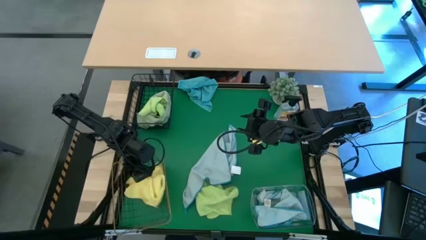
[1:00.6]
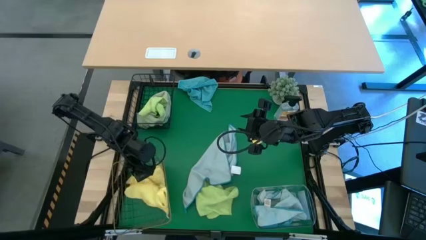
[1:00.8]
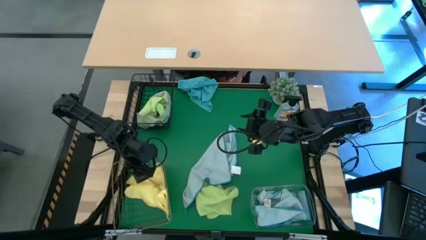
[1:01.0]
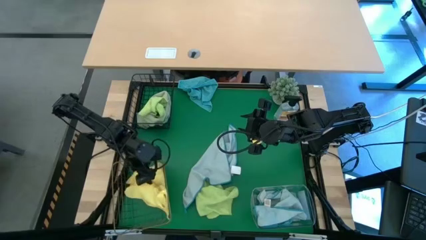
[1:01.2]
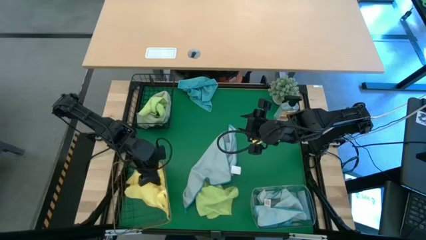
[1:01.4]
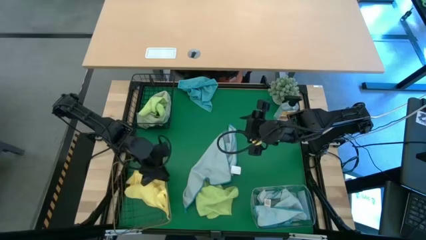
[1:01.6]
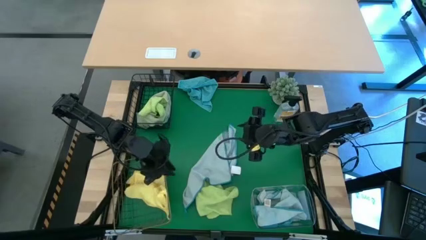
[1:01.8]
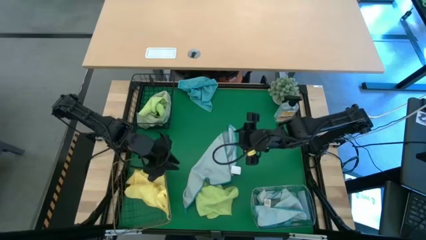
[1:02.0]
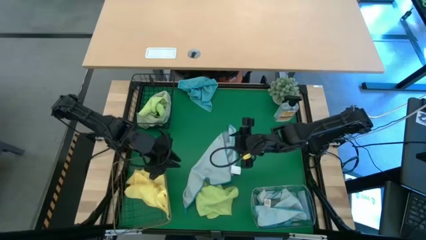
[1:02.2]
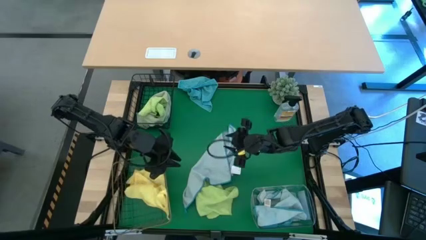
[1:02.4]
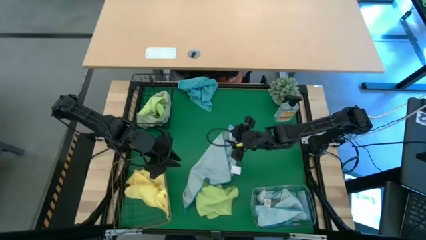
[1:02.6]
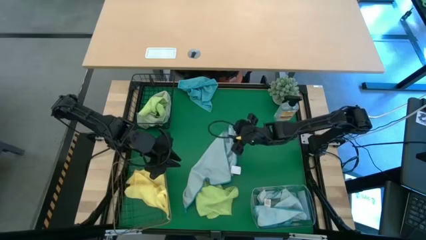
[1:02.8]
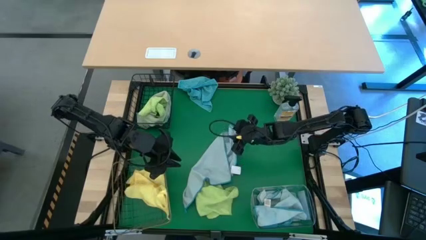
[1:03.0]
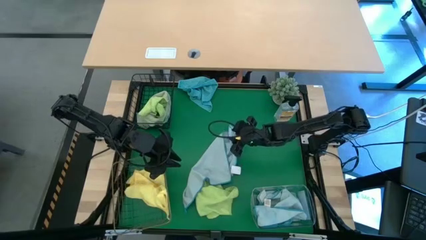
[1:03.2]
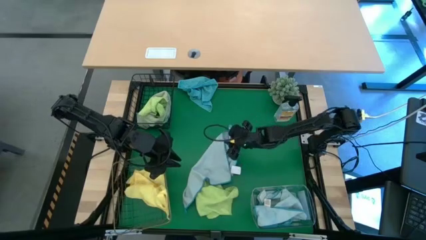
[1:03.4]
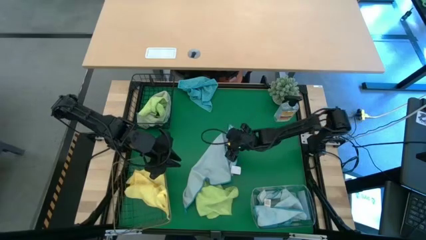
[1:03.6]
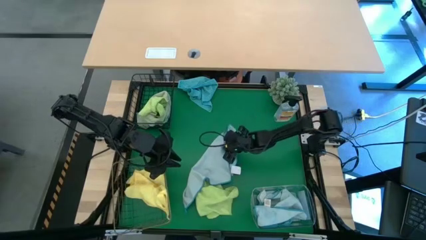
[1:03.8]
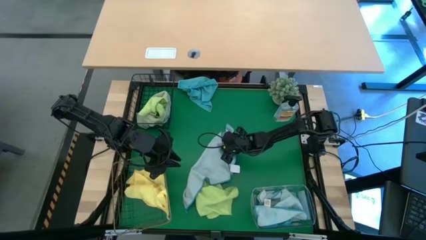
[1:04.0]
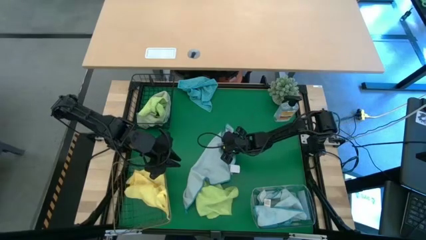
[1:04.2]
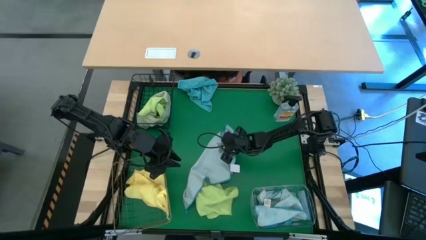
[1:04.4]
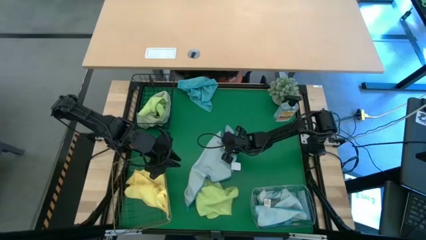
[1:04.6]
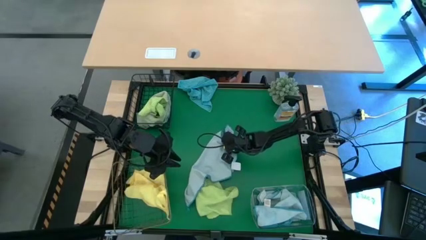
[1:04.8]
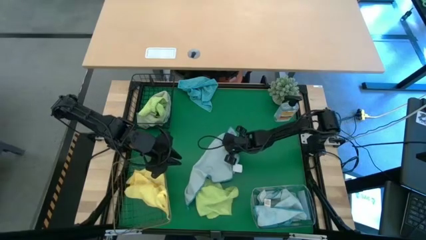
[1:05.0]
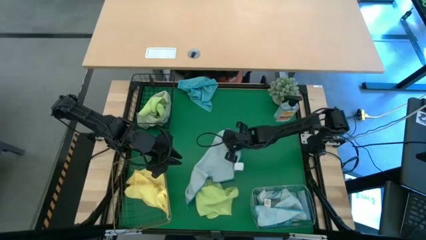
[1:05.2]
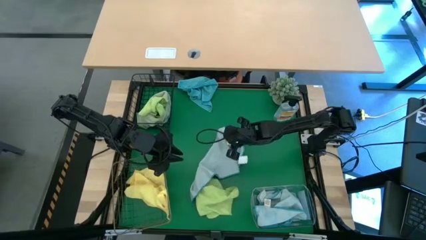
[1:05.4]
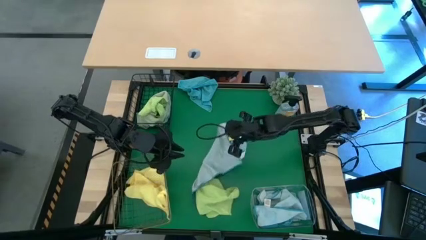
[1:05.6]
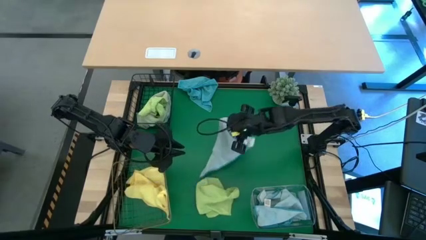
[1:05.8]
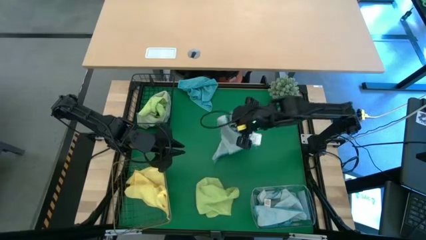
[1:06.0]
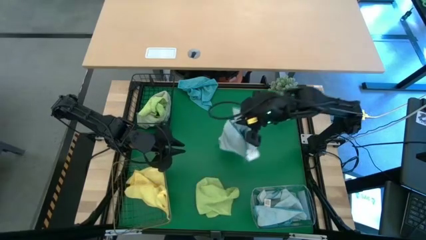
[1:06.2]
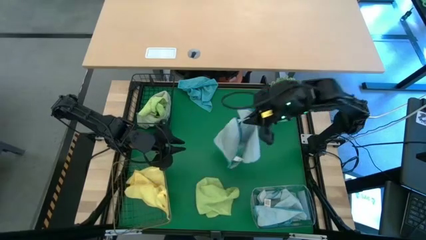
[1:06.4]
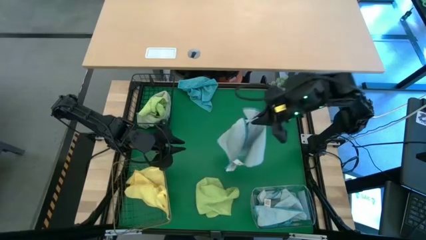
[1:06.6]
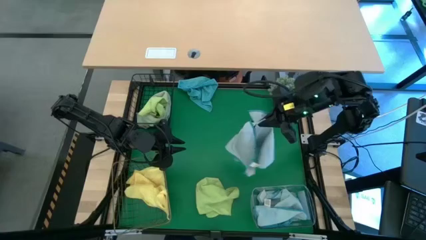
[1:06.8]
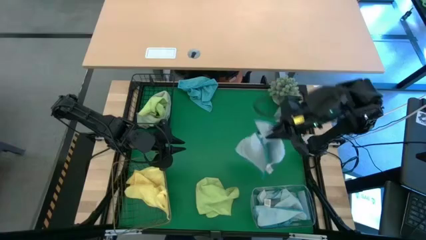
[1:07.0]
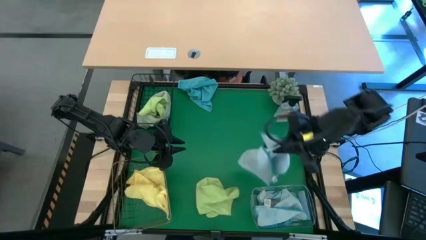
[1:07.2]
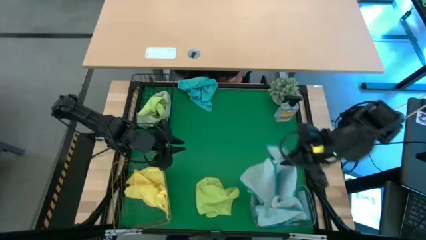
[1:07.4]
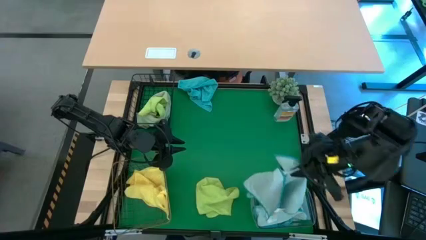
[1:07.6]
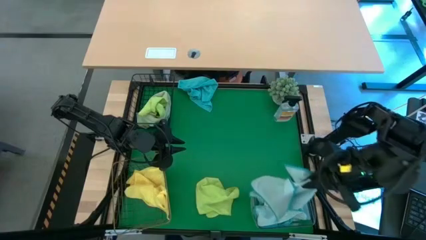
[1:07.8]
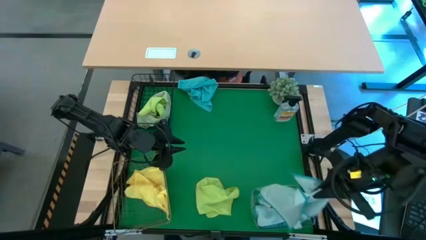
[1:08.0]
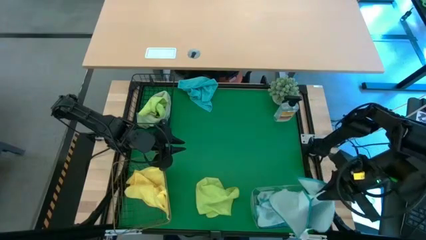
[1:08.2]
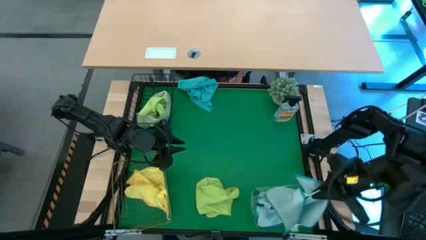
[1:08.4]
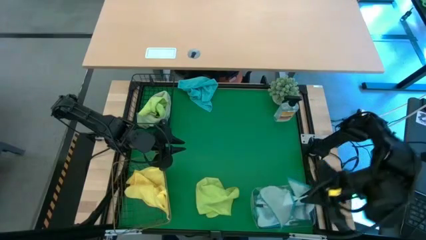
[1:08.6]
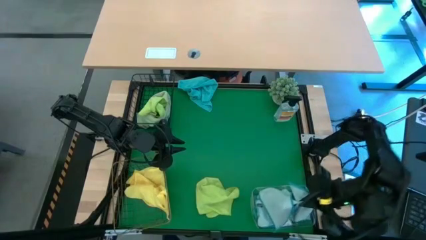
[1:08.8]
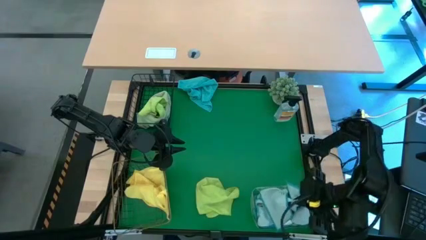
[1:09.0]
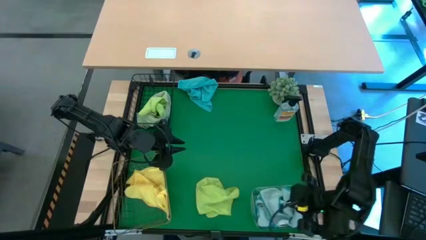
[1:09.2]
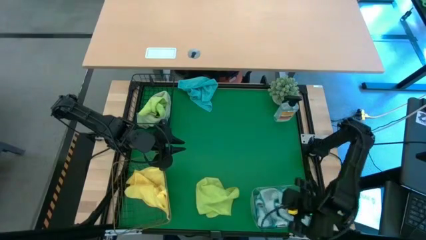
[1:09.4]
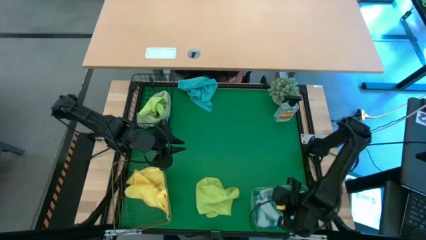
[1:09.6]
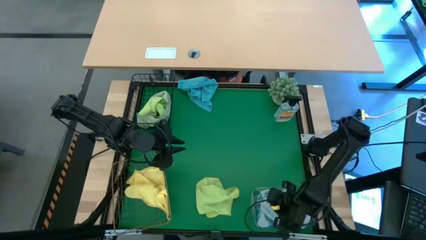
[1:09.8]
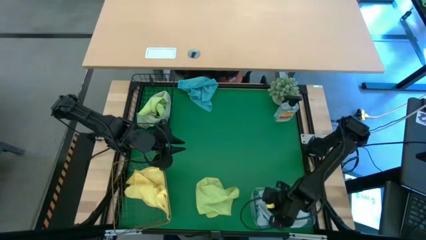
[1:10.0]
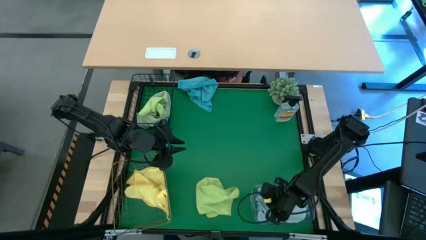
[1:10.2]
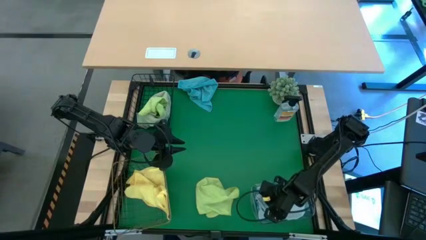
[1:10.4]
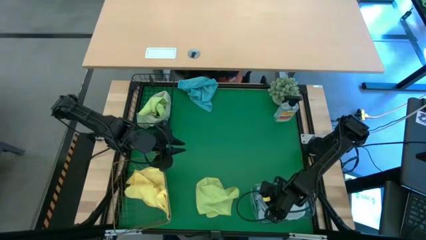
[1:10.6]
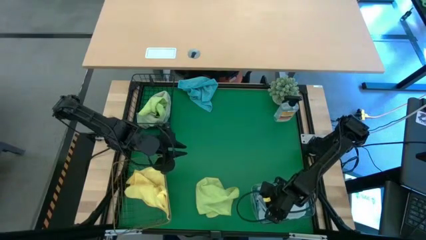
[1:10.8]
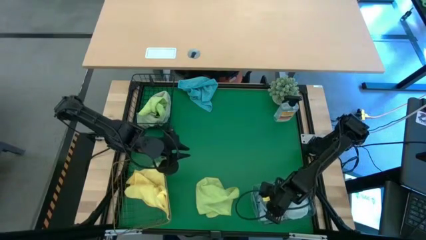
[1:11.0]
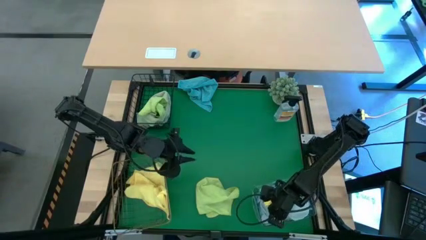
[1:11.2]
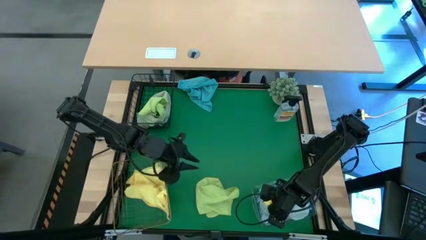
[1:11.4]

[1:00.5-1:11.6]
Task: Sort microfiber towel by color & place in baskets
Put the light blue microfiber cloth into the transparent bin

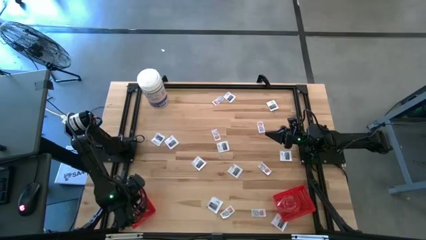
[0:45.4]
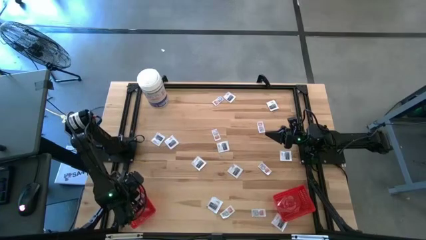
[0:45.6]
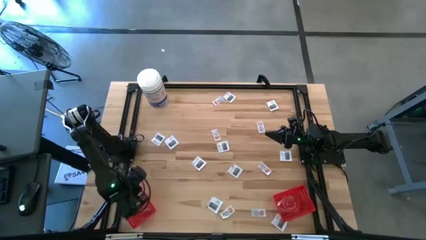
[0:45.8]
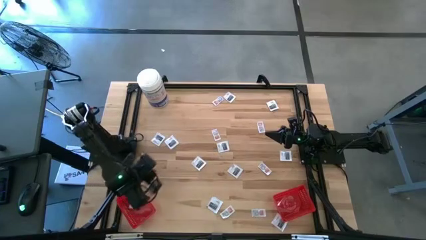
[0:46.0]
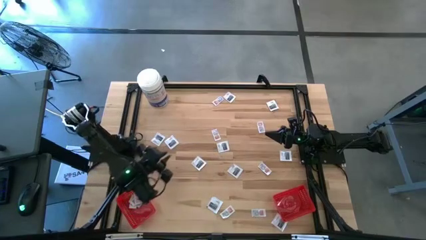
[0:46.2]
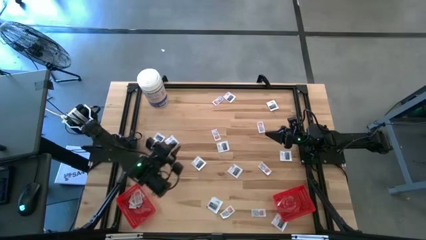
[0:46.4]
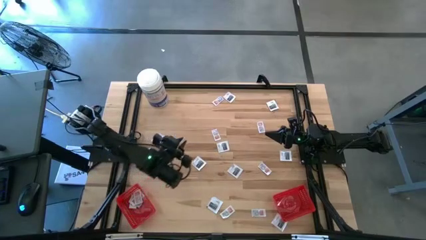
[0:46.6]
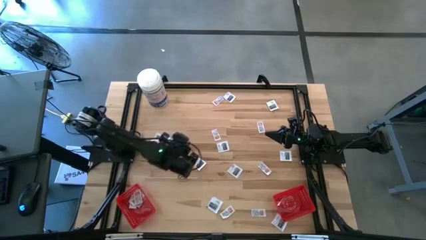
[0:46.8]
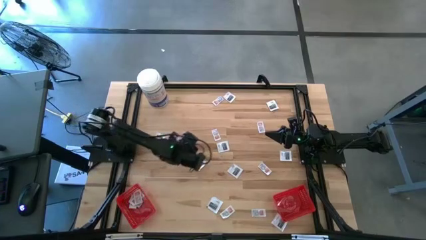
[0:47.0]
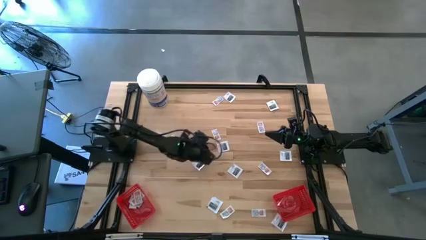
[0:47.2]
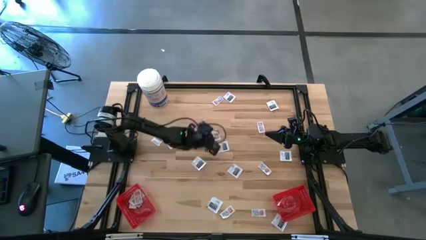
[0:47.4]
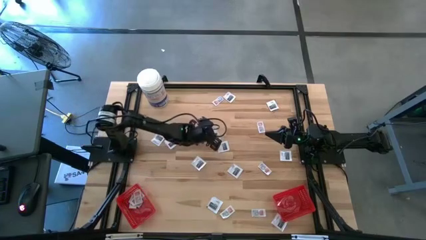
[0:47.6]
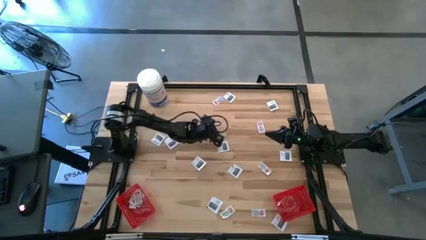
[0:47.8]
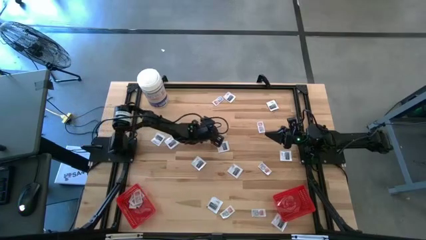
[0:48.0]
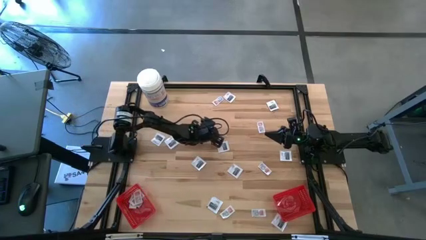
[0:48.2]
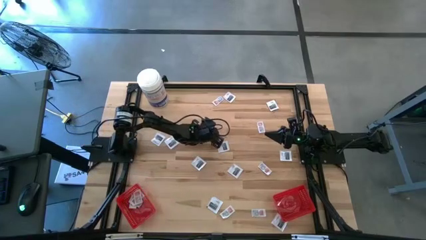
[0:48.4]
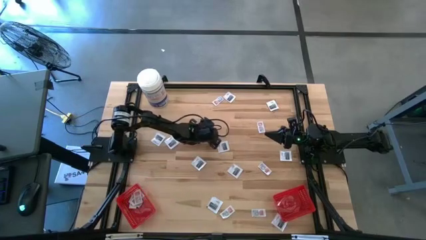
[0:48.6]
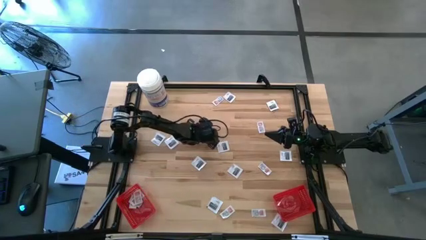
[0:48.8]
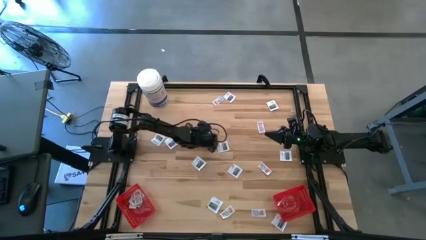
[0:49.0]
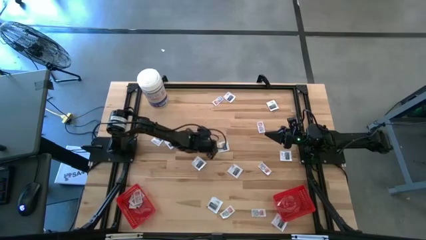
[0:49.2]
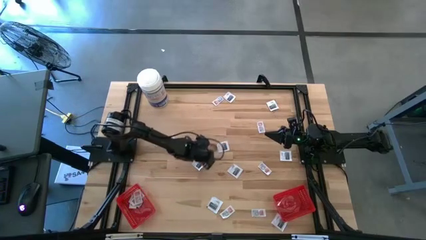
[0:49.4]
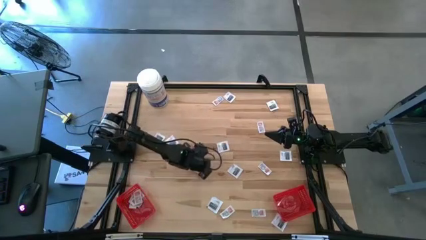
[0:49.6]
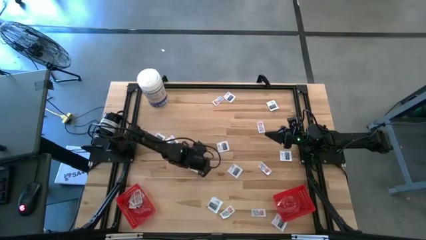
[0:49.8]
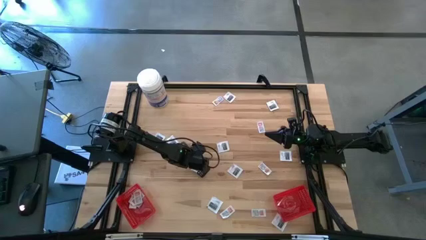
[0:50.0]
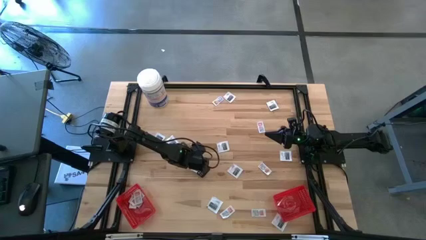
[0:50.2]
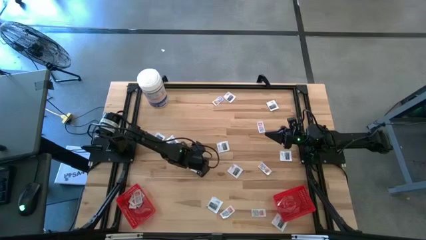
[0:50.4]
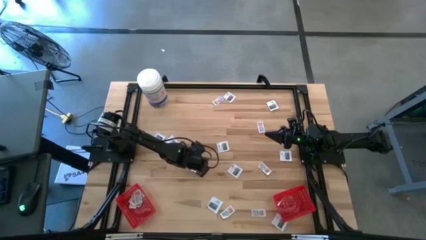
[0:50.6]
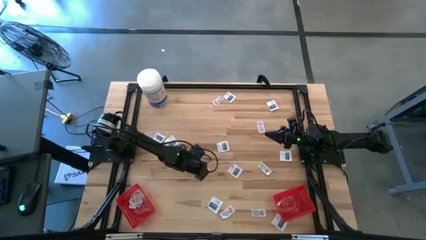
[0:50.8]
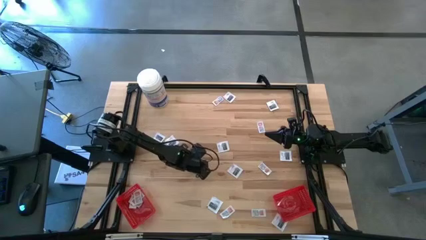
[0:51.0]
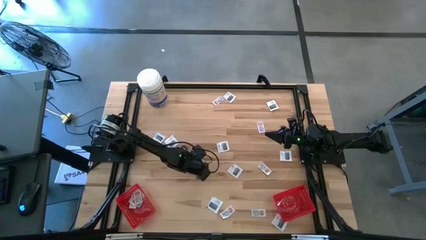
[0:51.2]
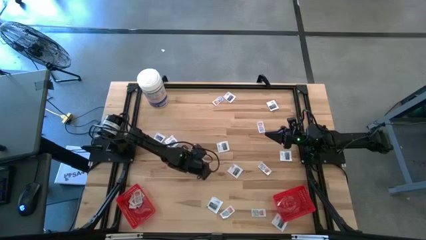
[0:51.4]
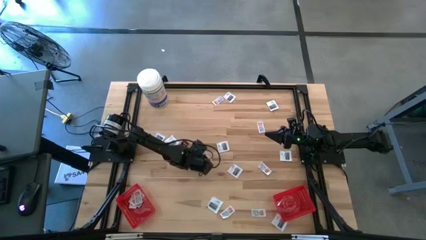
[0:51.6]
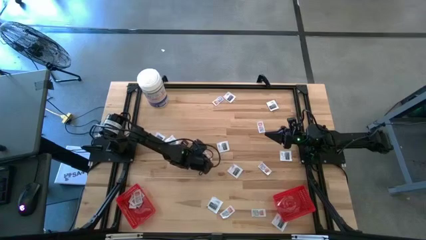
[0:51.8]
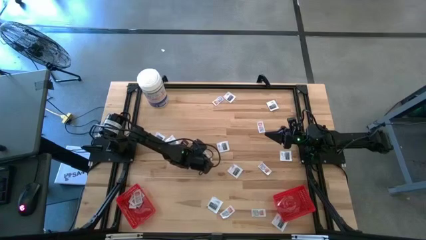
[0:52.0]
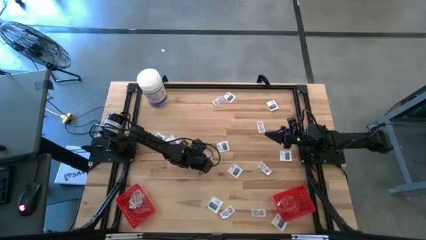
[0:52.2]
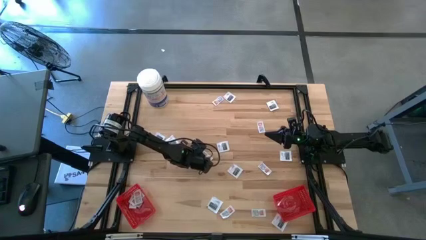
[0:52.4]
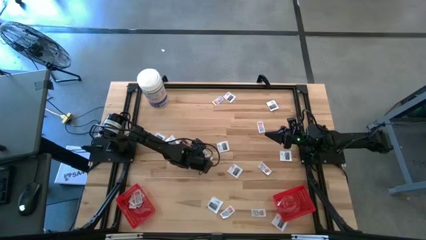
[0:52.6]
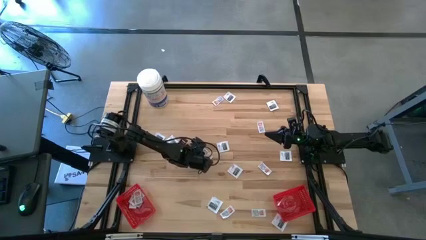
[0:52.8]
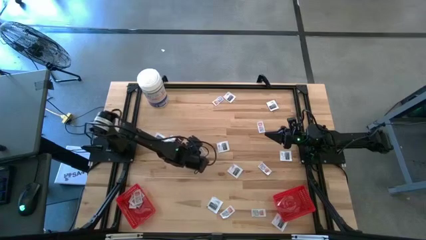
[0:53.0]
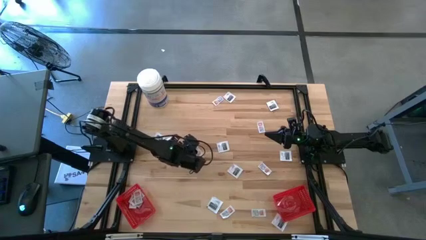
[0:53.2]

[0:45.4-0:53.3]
Task: Pick & Place First Aid Supplies
Put the ointment pack into the left red bin
